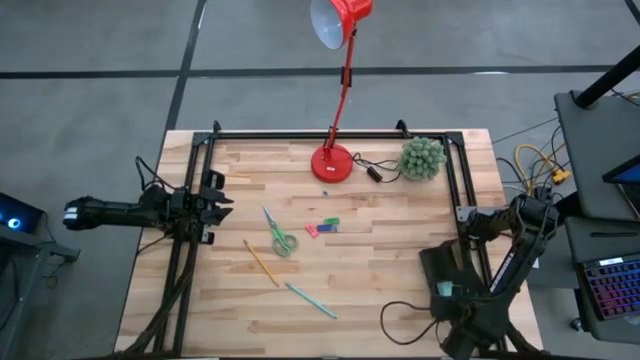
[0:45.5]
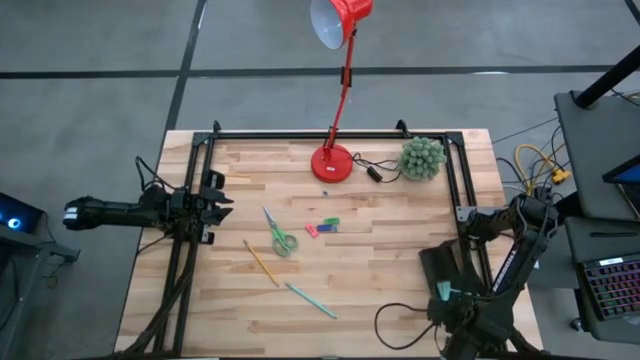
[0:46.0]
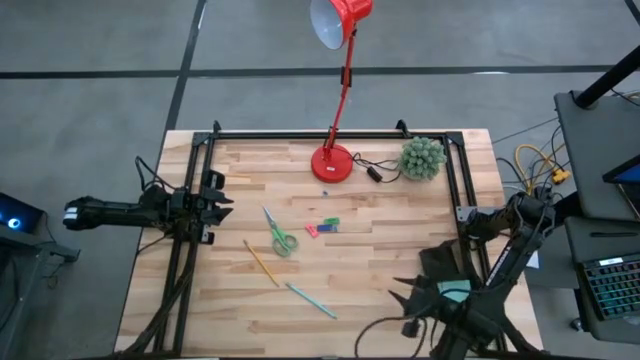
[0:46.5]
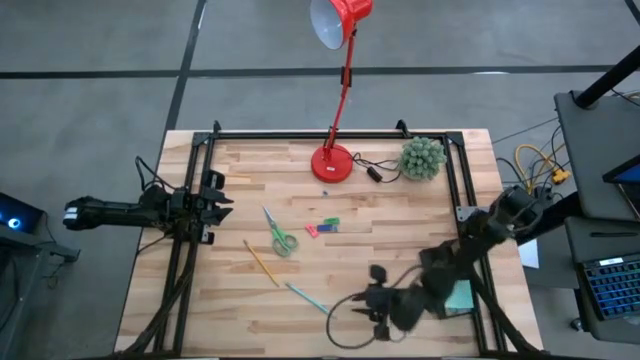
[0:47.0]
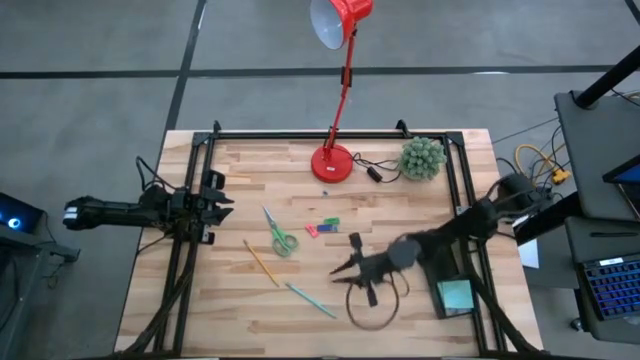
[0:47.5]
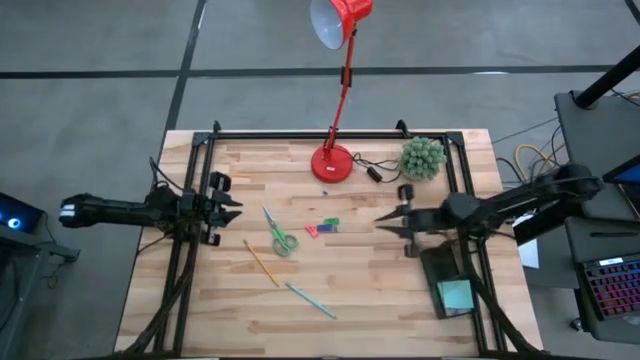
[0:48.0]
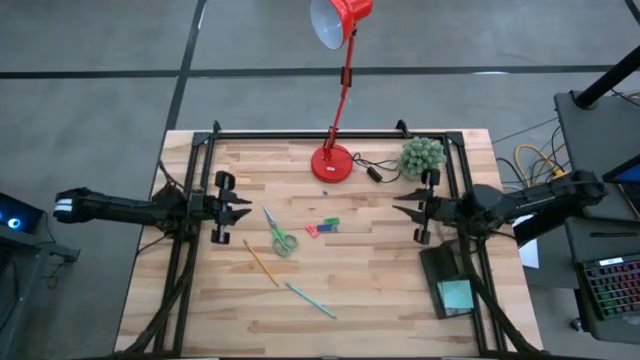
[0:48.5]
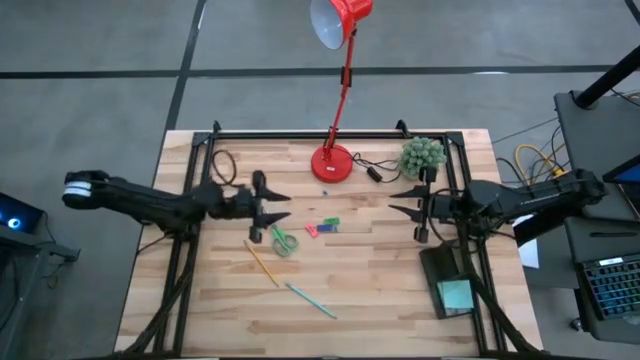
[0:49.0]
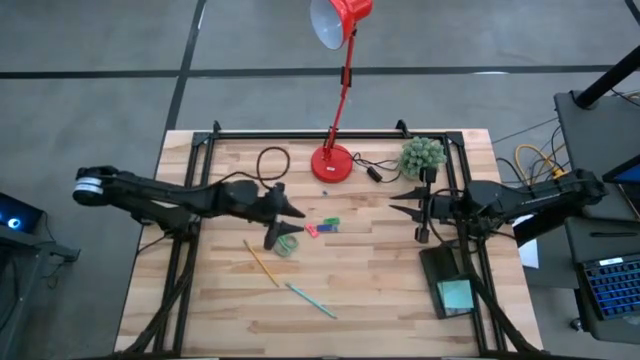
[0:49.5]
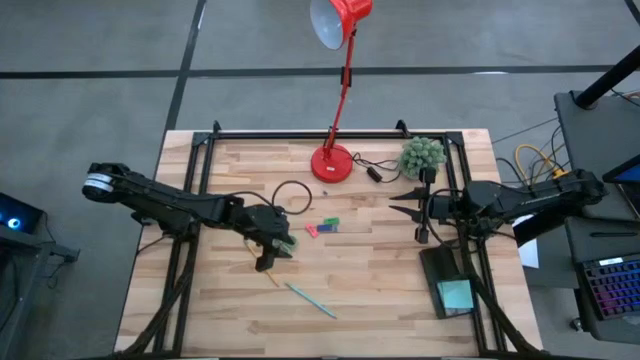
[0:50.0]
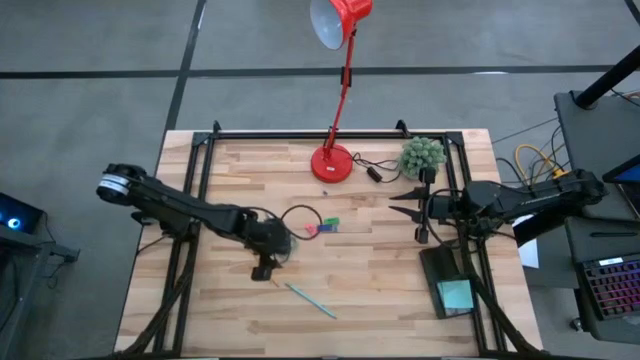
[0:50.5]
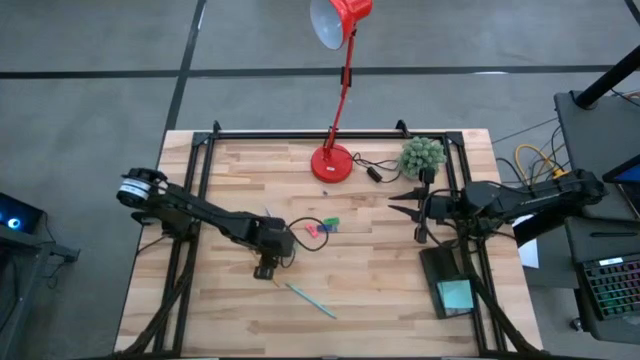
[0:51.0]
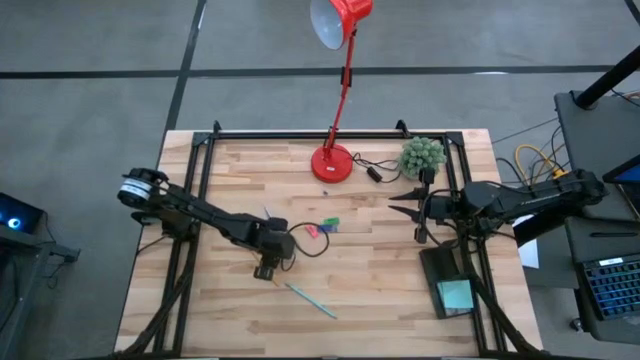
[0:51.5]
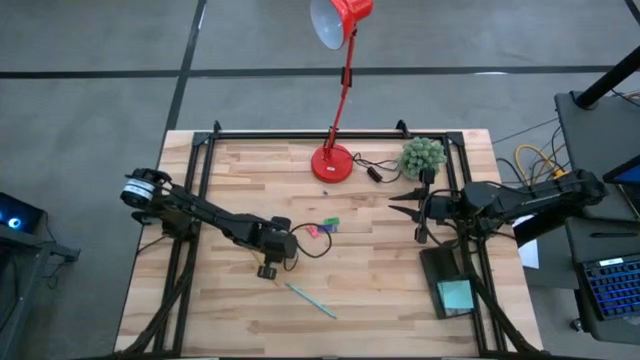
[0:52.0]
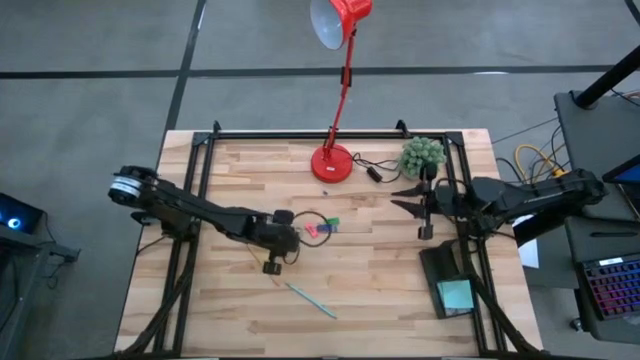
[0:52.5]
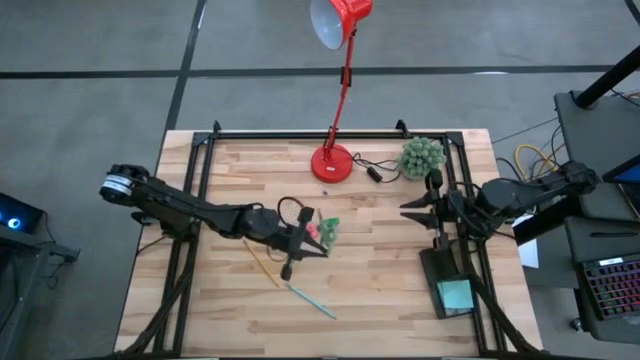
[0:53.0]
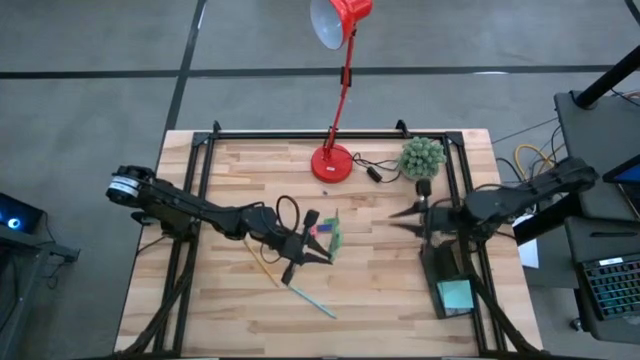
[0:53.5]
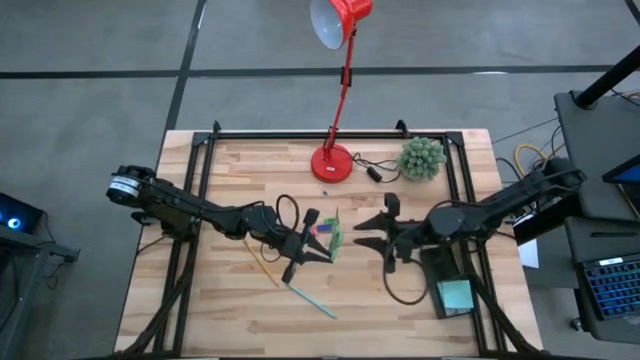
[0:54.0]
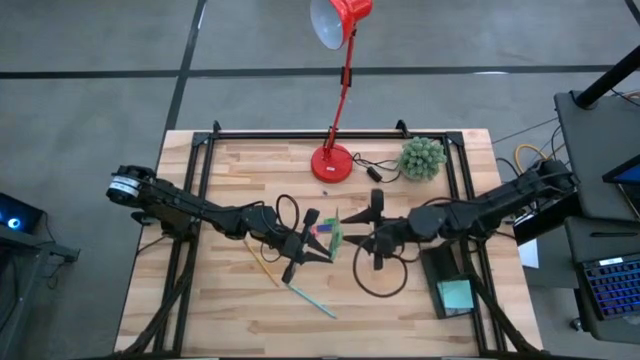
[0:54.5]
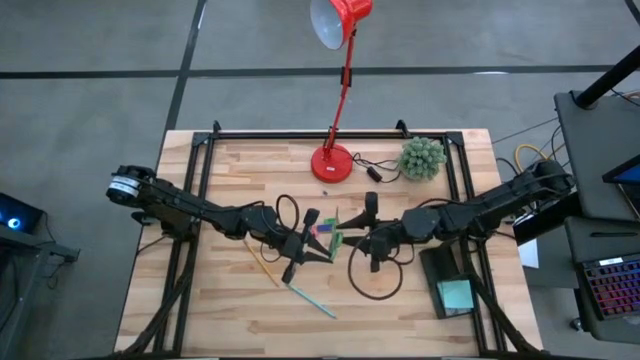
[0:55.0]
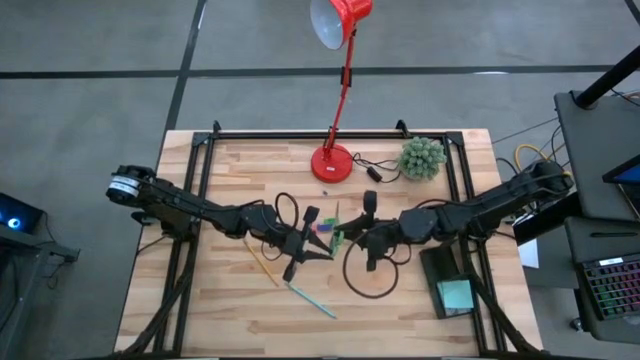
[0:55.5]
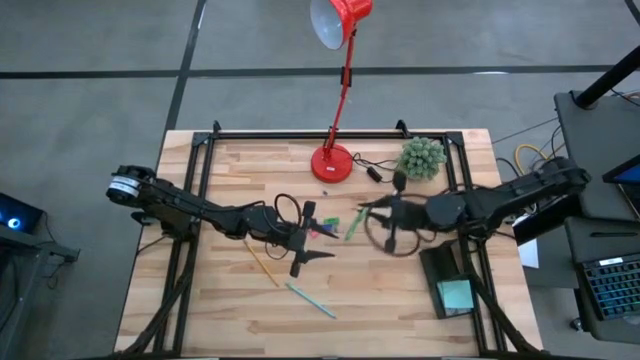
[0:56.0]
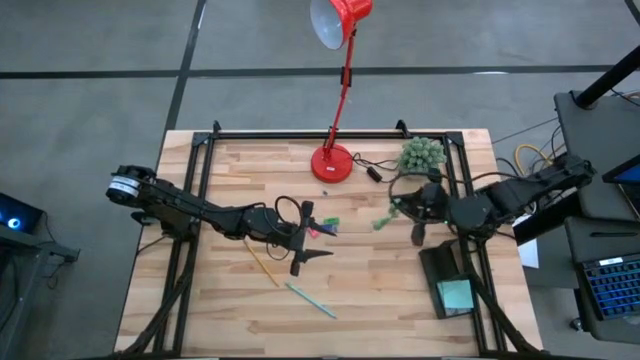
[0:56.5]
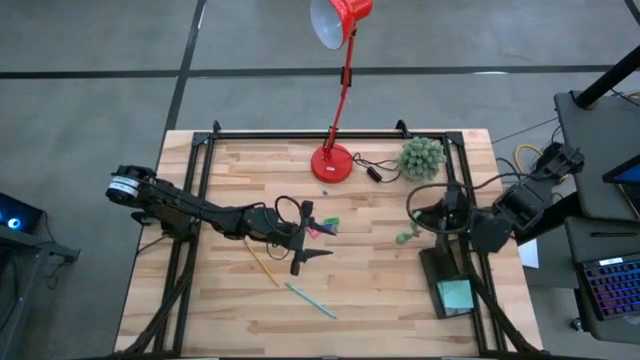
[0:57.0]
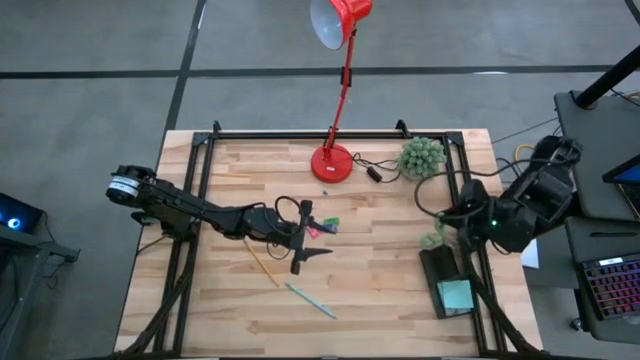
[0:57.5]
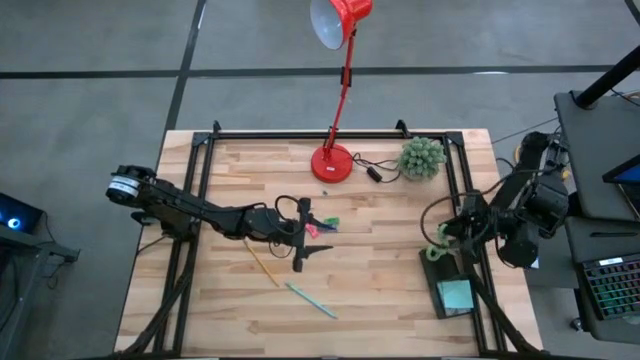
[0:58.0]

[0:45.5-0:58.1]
Task: Pick and place office supplies into organizer
Put the green scissors into the black desk organizer

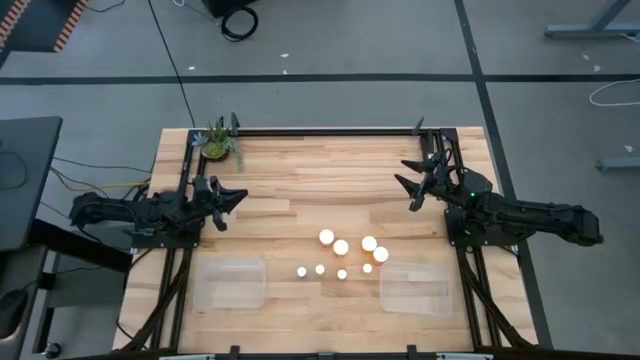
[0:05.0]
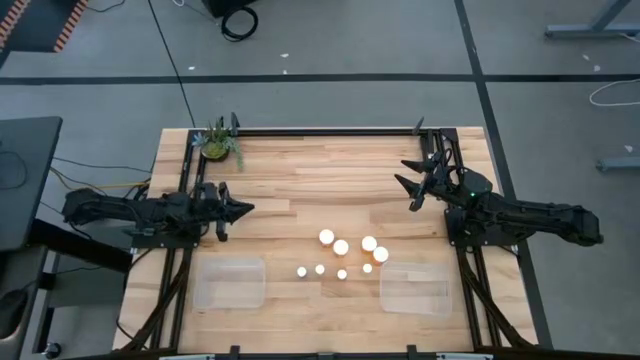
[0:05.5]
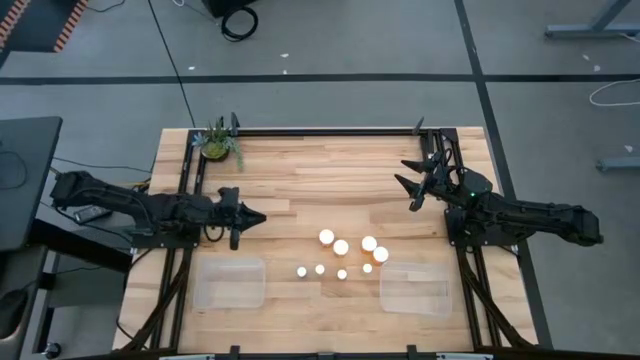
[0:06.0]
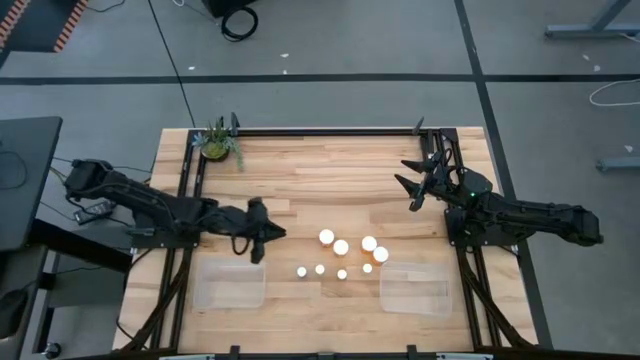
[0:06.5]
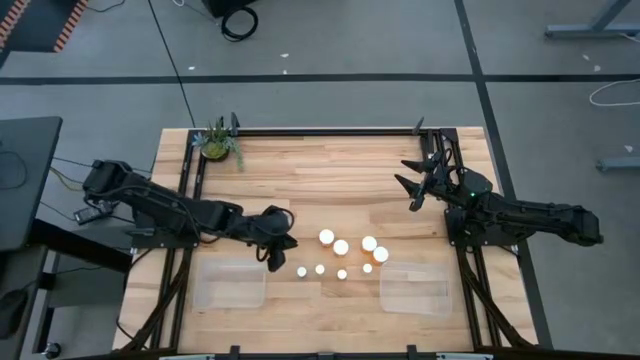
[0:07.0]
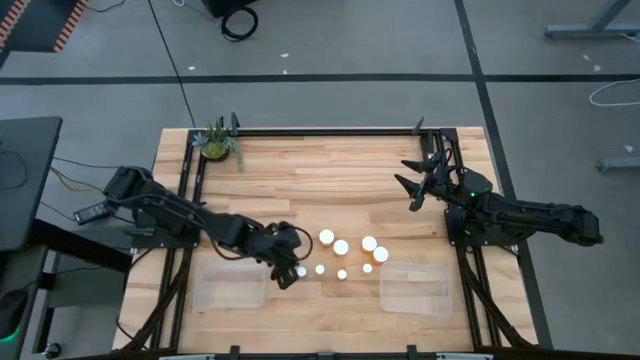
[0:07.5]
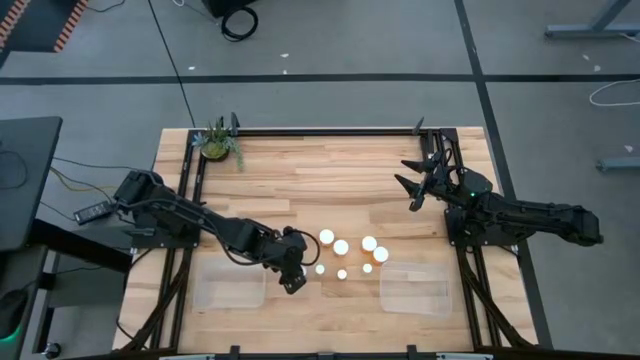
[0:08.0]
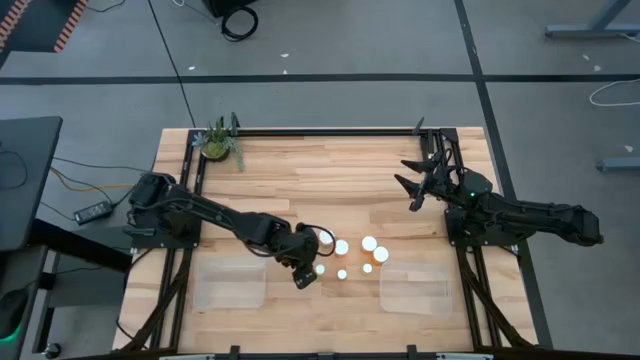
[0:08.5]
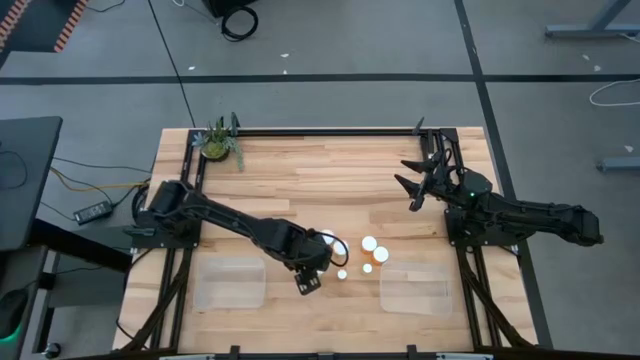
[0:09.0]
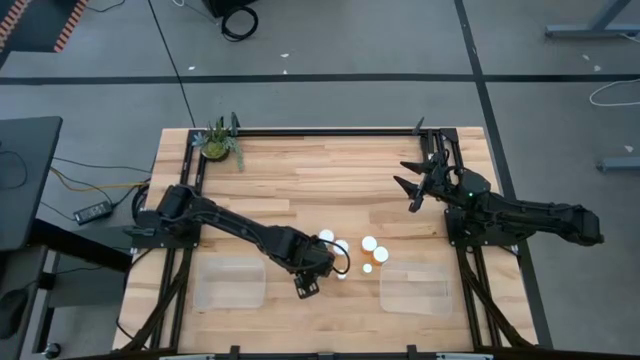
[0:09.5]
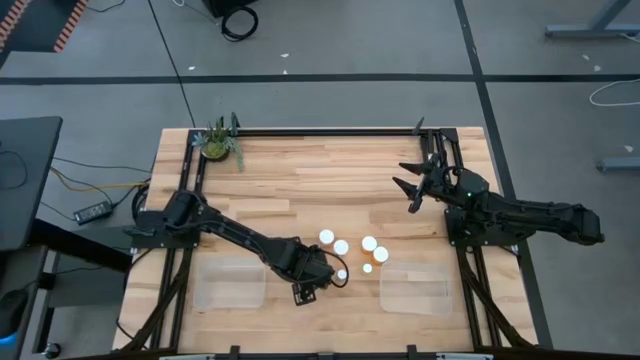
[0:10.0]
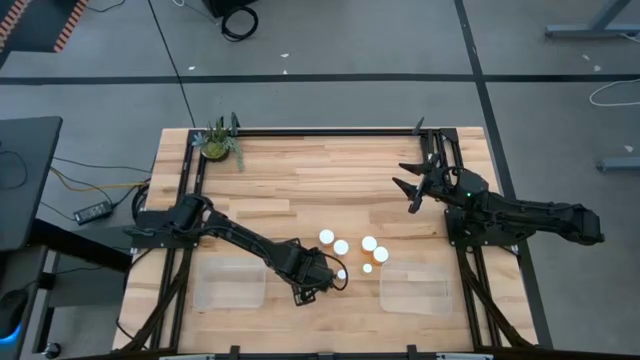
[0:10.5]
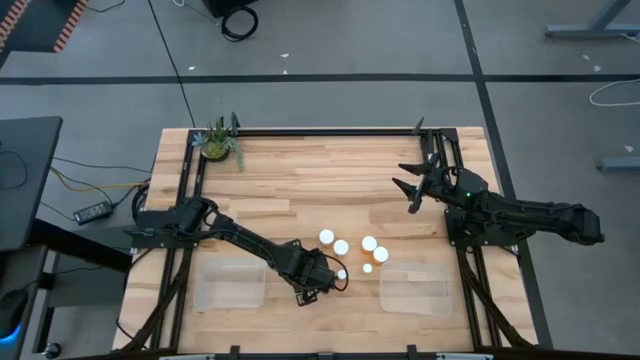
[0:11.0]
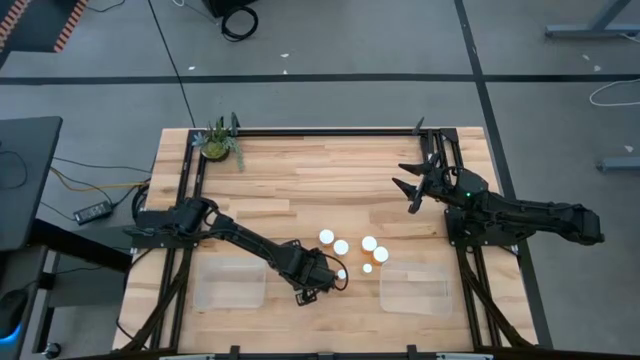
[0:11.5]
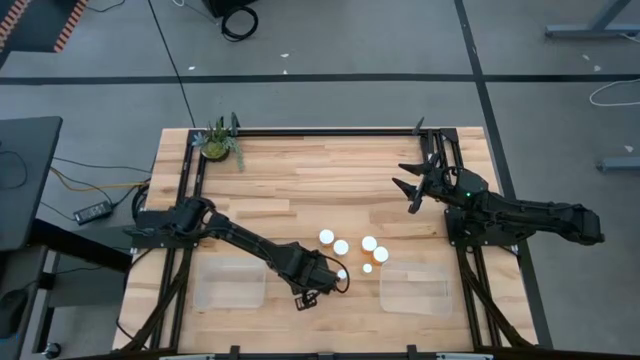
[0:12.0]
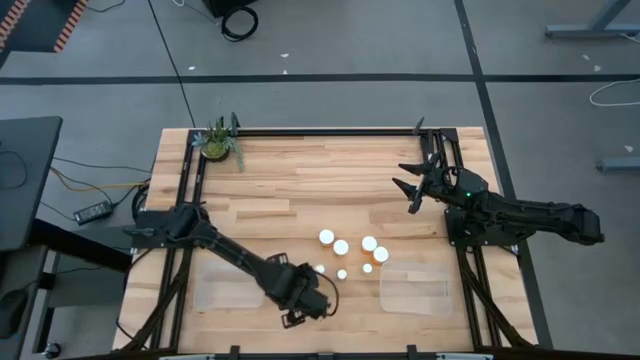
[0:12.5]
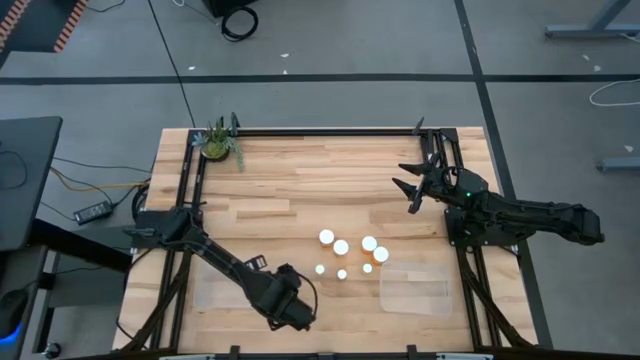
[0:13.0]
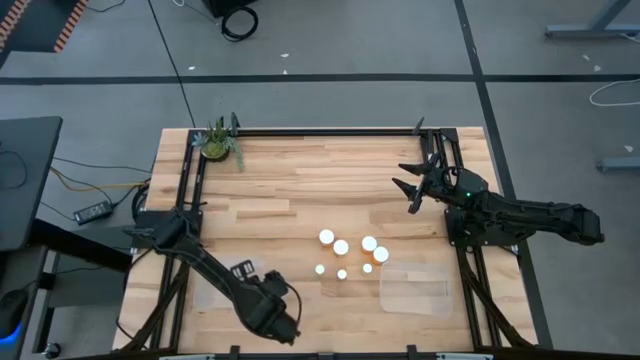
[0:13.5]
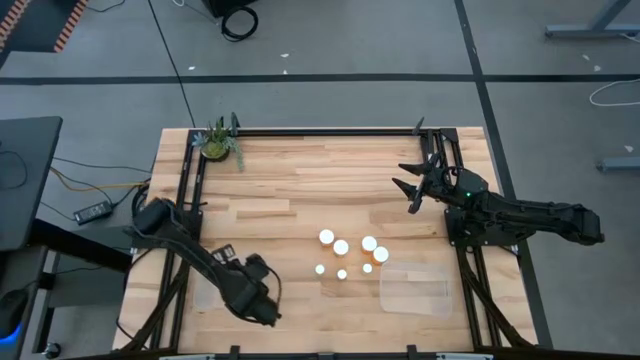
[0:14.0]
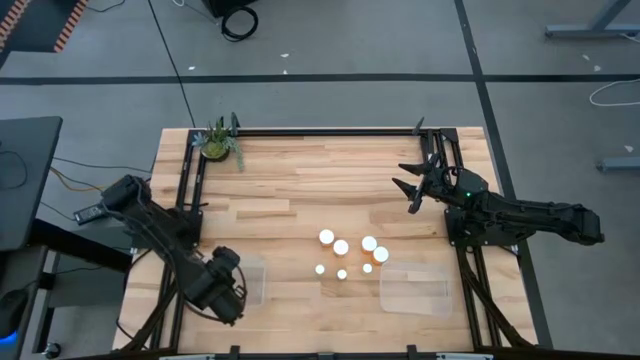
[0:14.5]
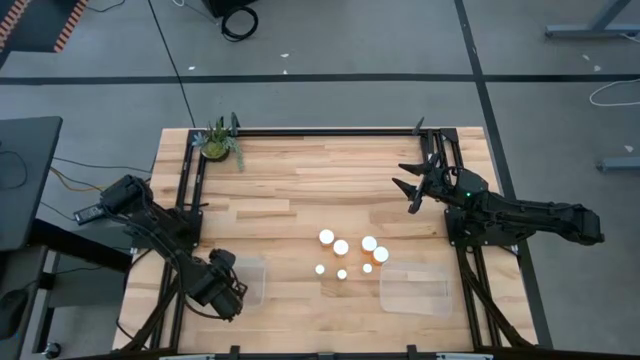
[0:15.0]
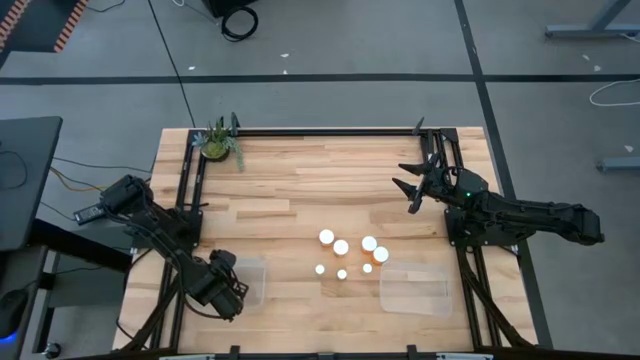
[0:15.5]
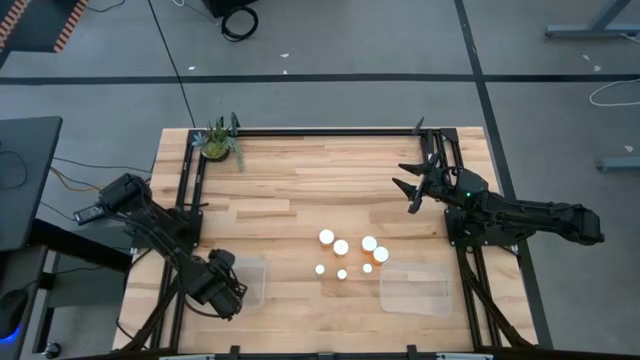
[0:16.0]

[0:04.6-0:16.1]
Task: Pick and place medicine bottles into bin by pill shape (circle, oval)
Put the small blue pill bottle into the left transparent bin
